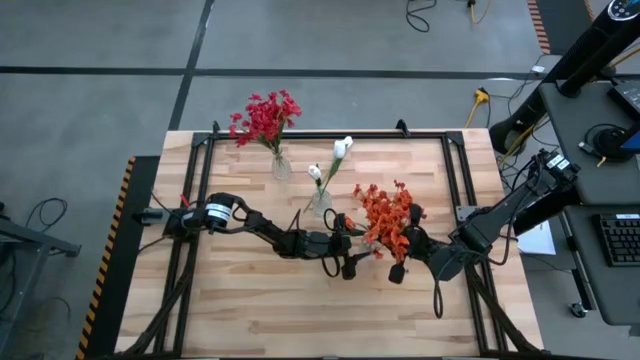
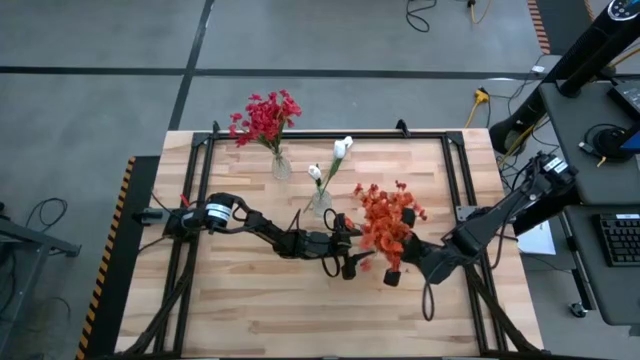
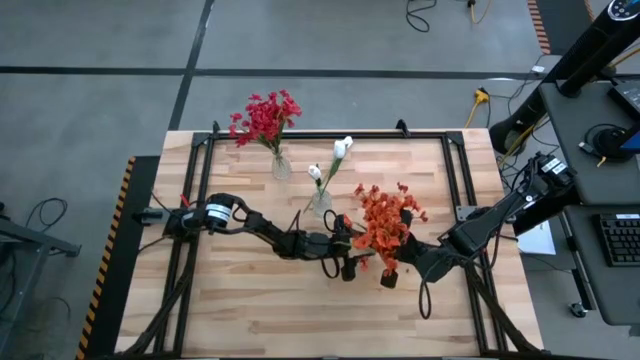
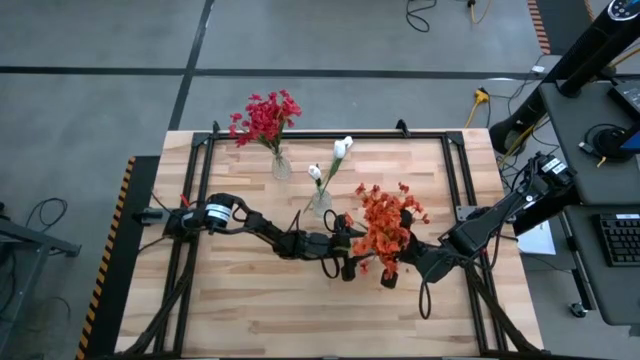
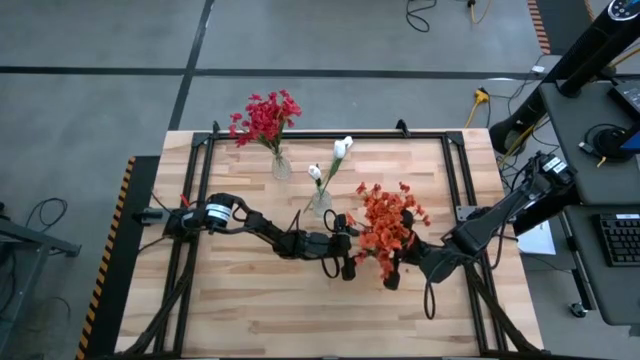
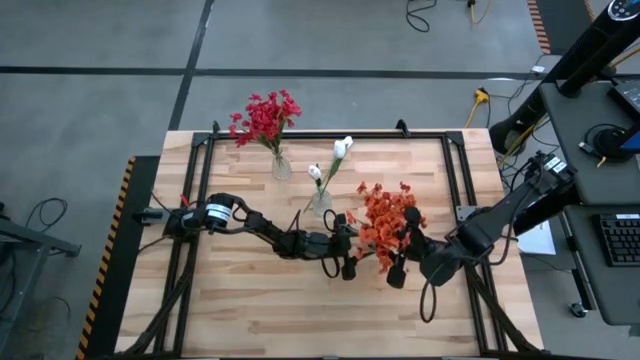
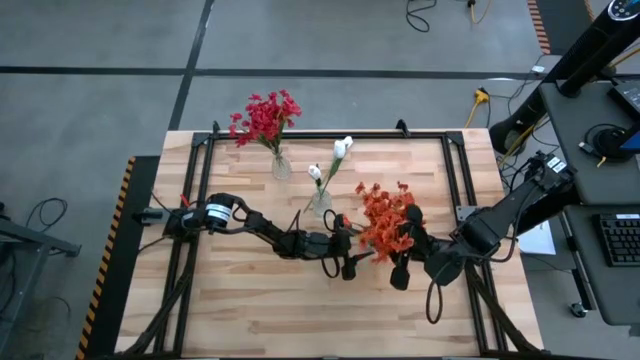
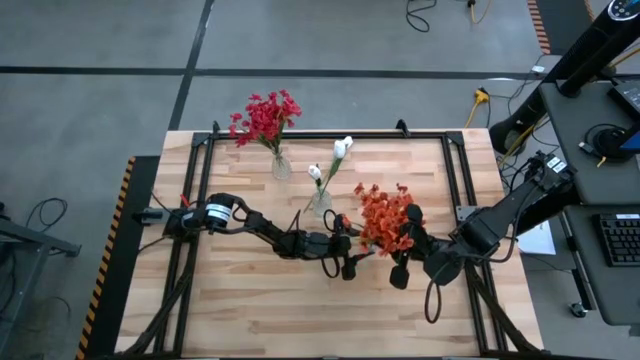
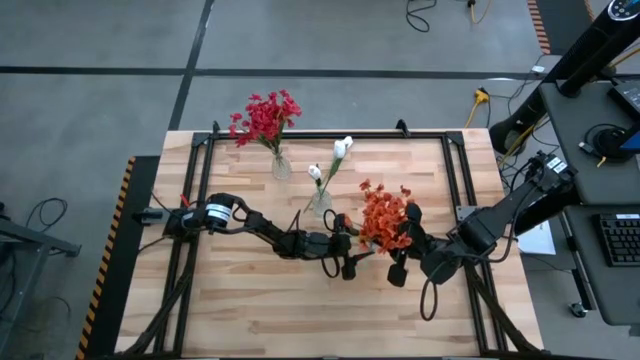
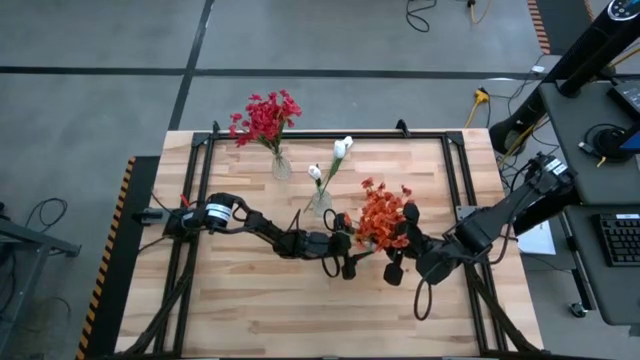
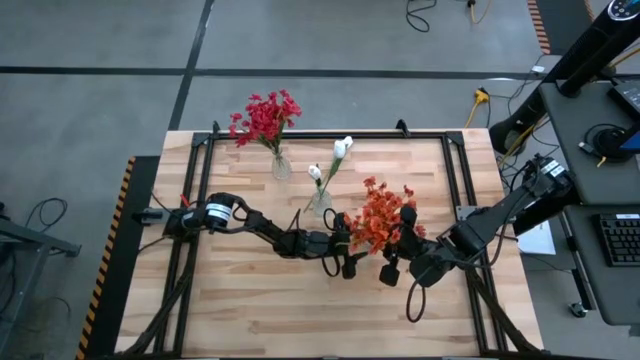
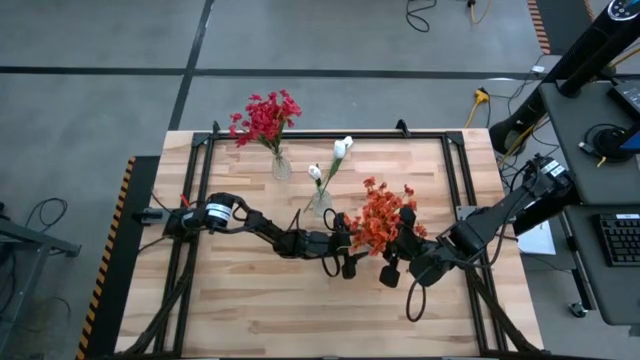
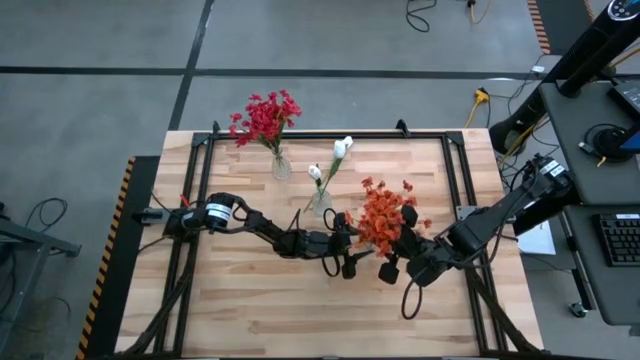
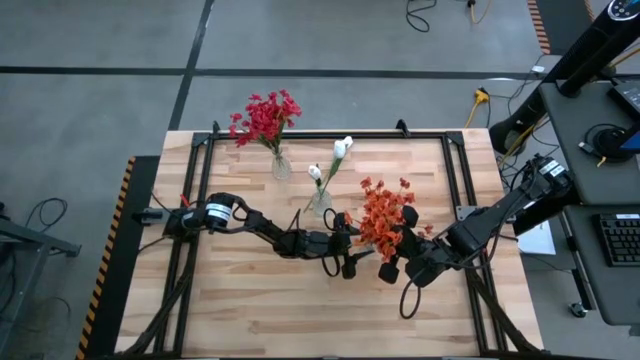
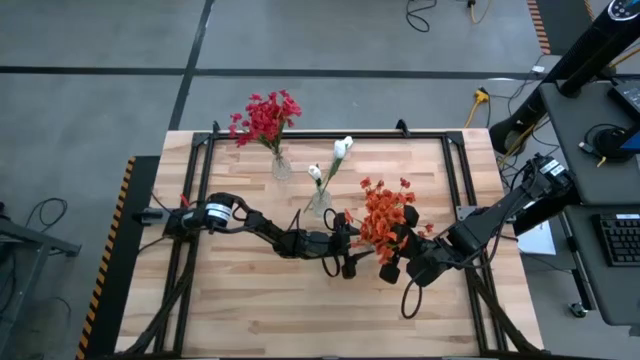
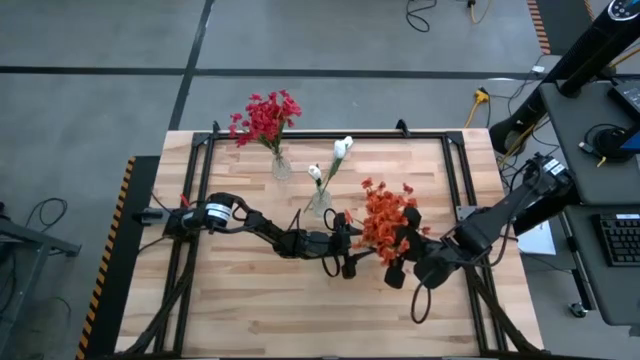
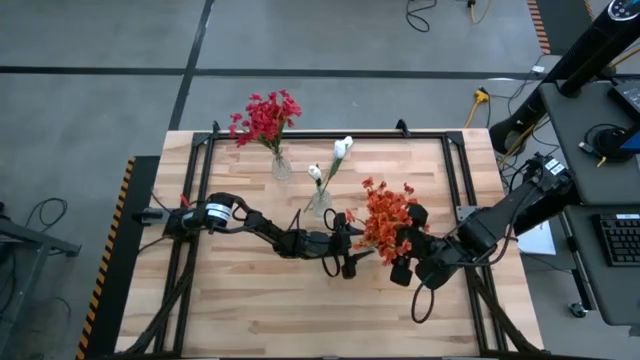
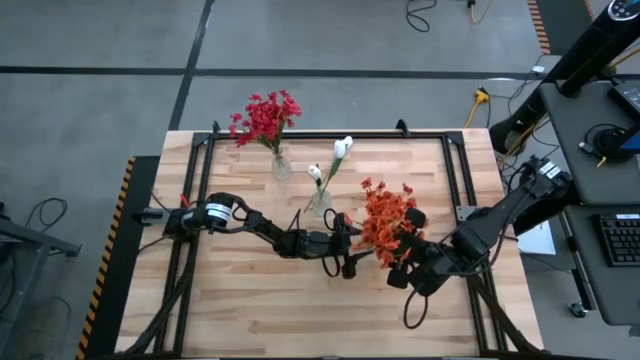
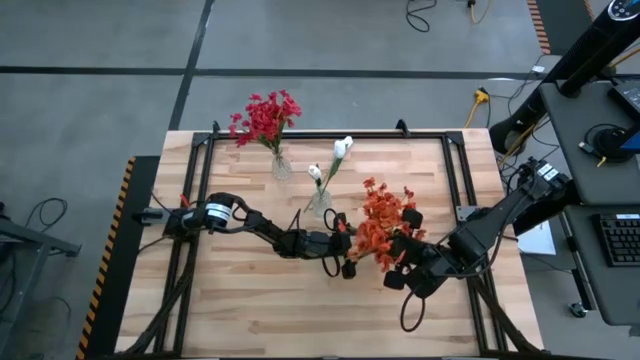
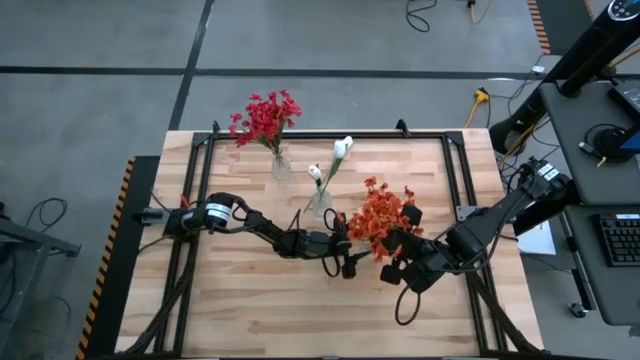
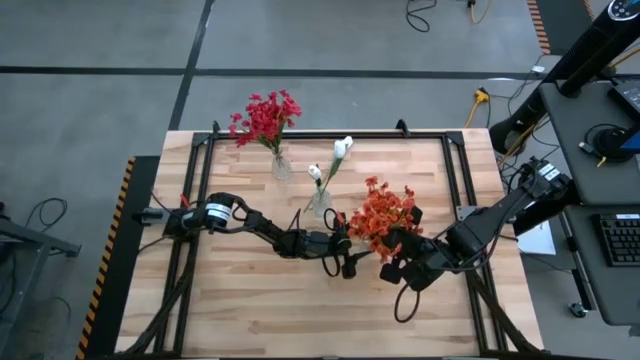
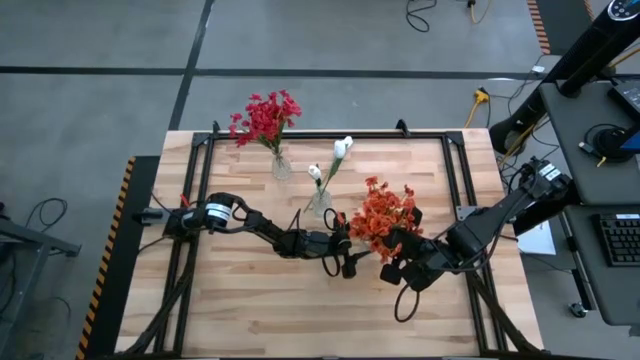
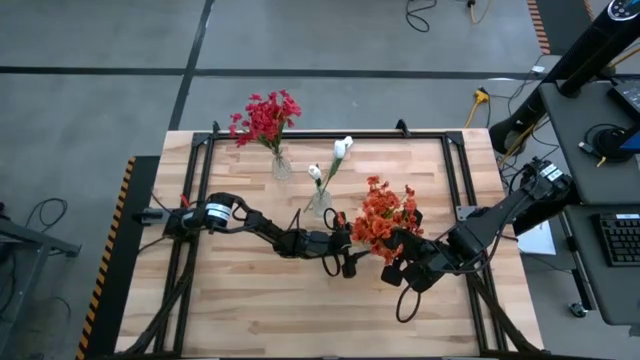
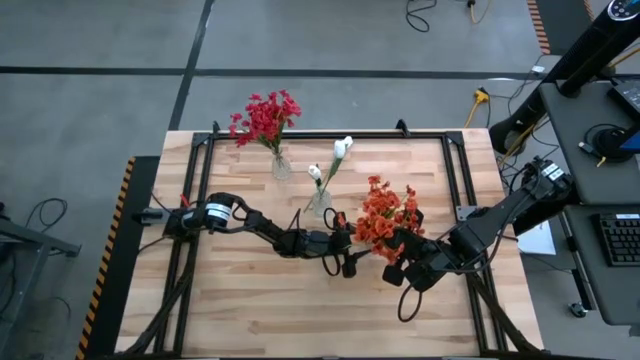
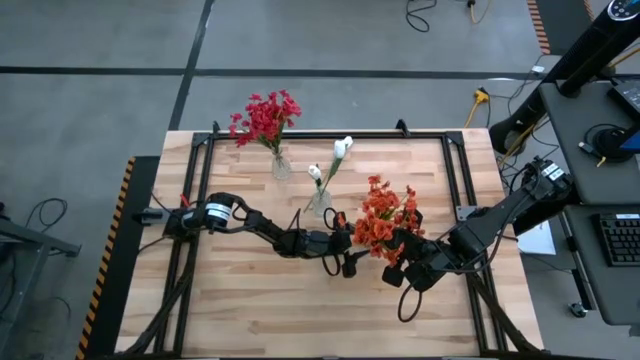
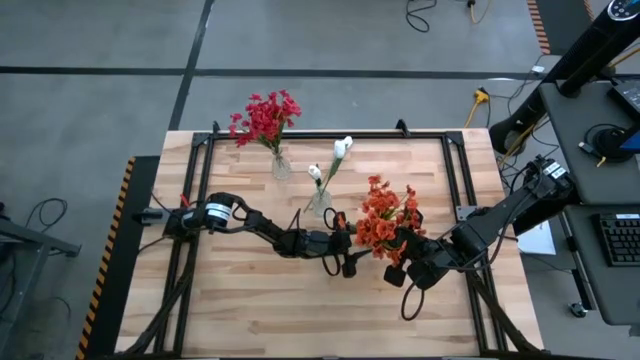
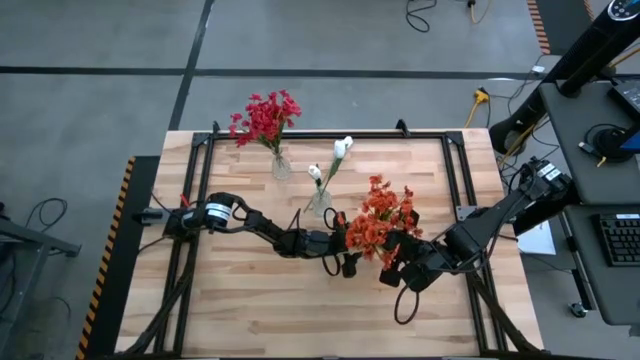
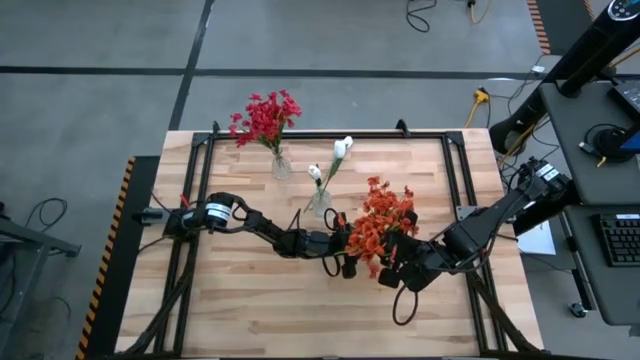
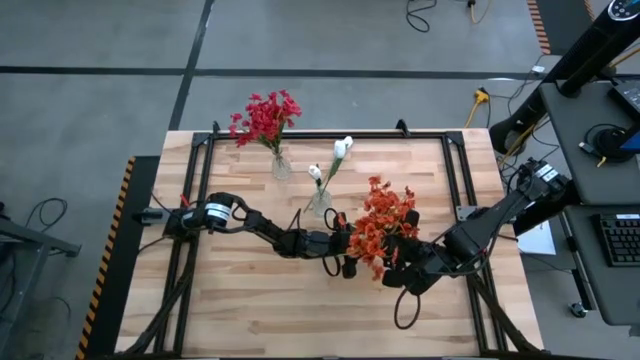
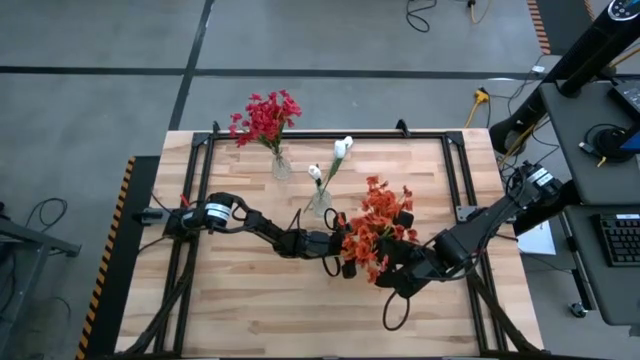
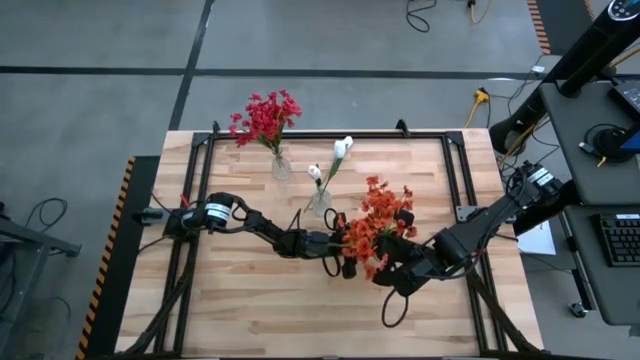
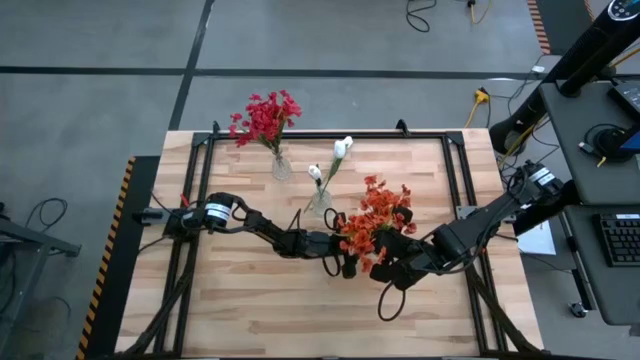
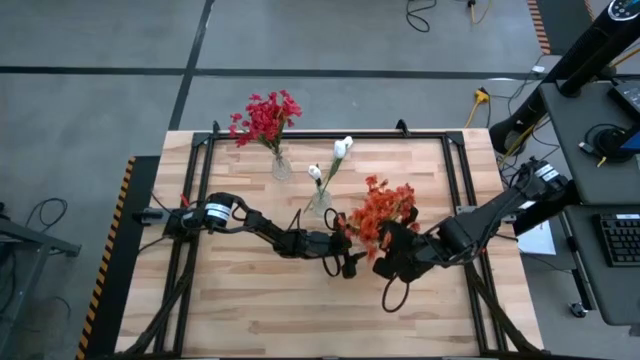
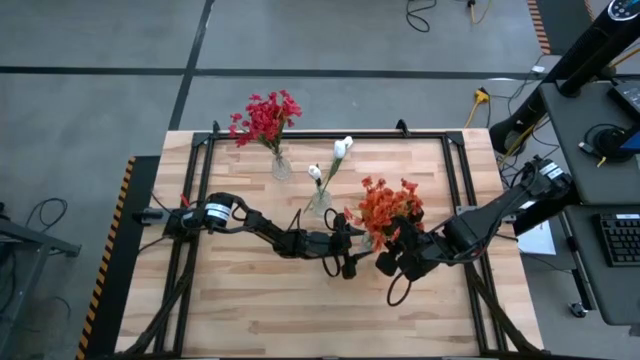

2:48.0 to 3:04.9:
Task: Sort flowers into vase by color
Put the orange sprig flower into the bottom right transparent glass vase

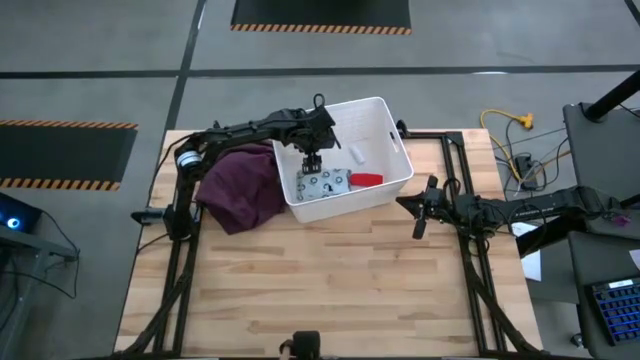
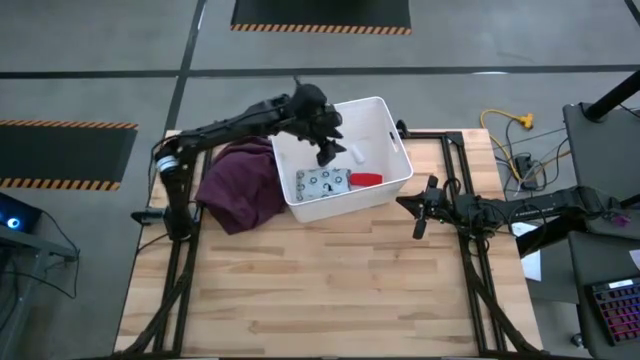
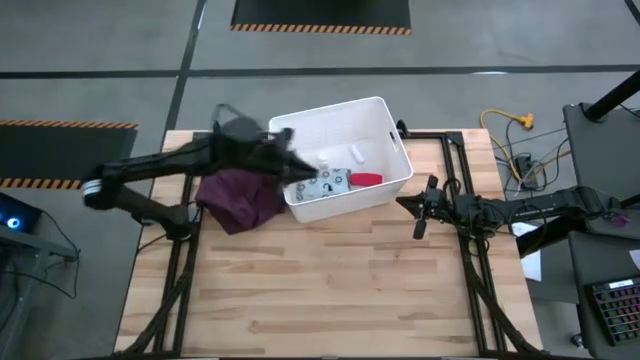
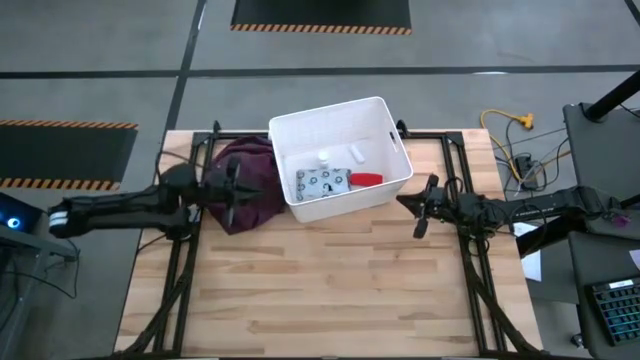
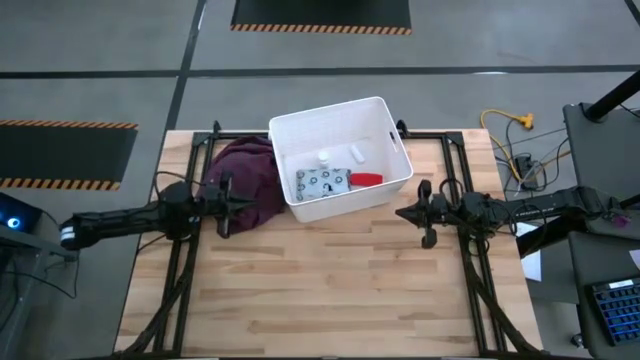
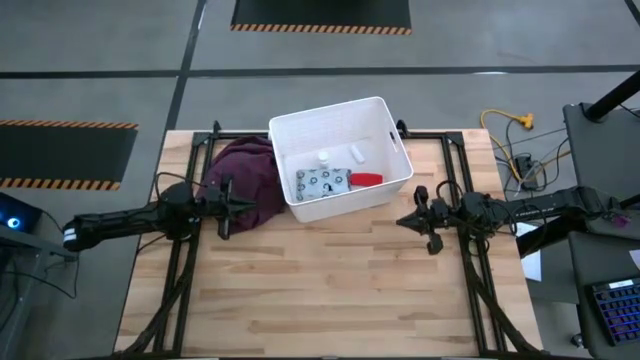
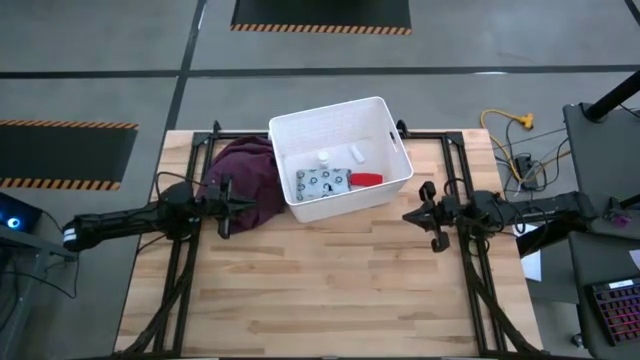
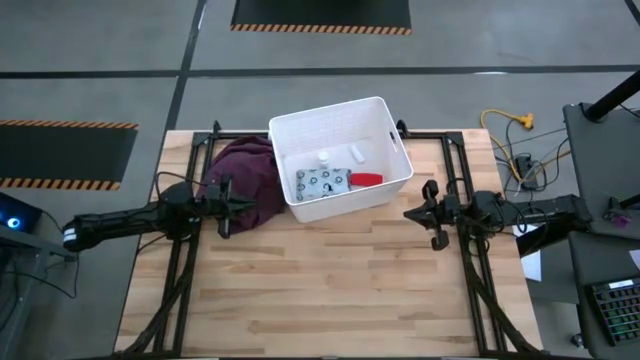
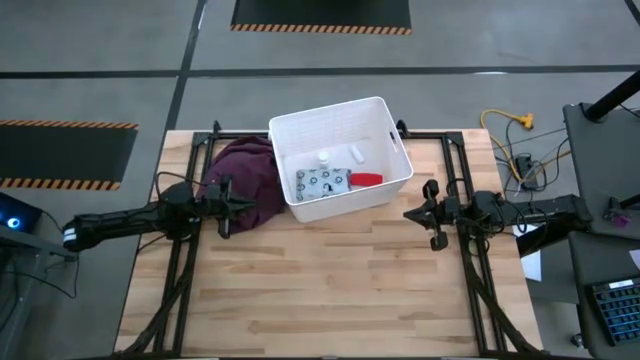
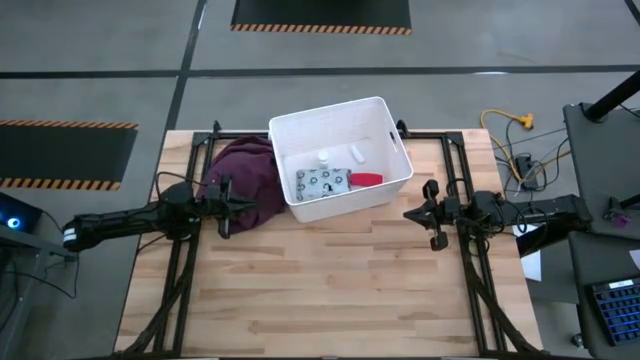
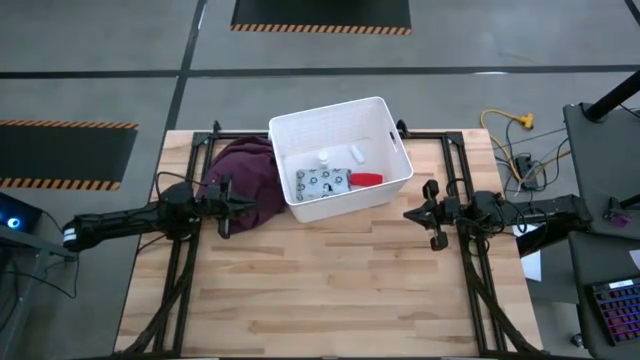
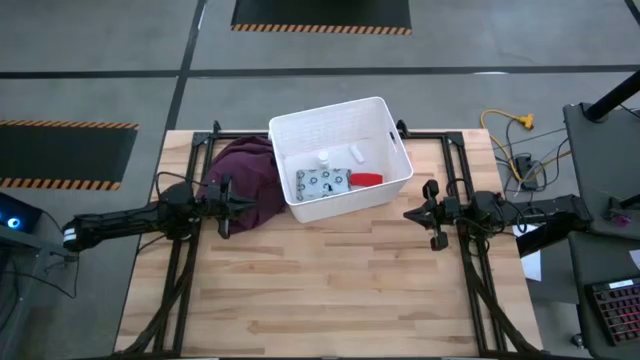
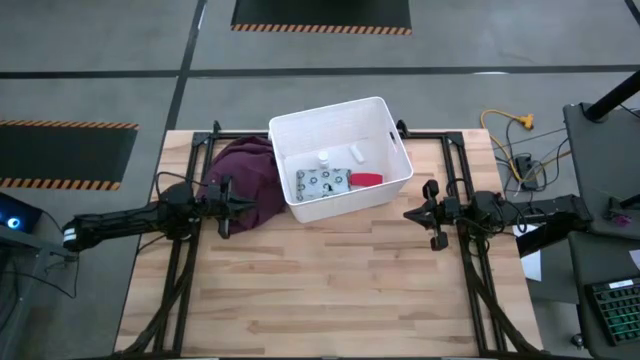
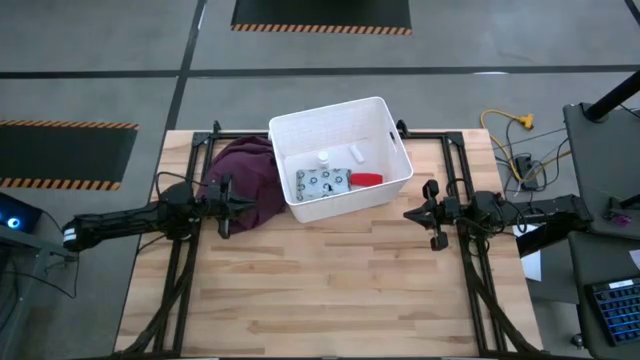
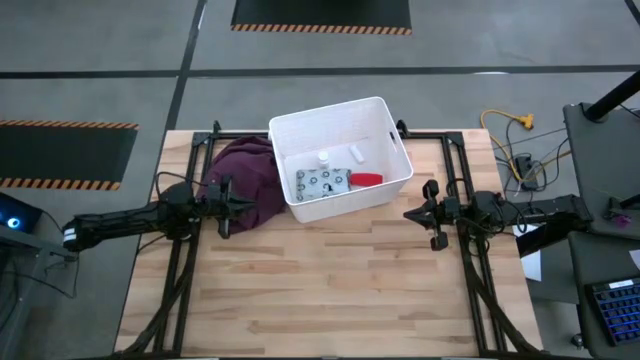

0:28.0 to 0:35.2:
Task: Pick & place medical supplies in basket/bin
Return to Home Position
